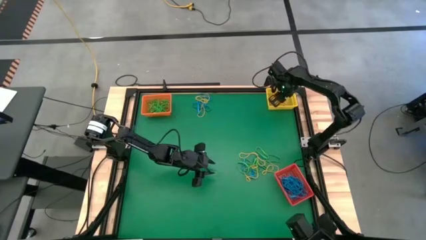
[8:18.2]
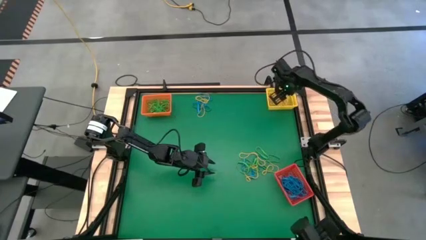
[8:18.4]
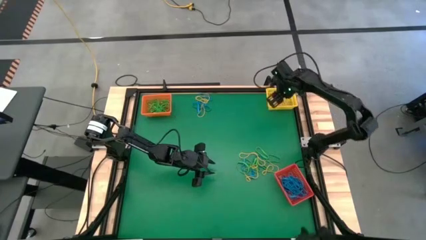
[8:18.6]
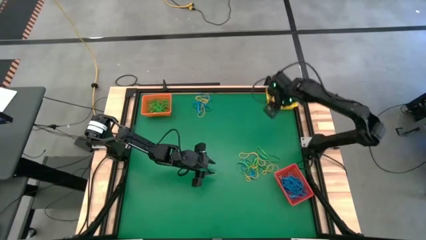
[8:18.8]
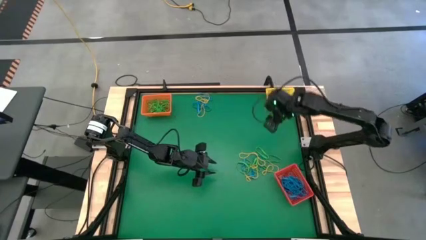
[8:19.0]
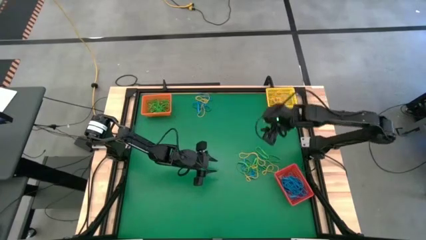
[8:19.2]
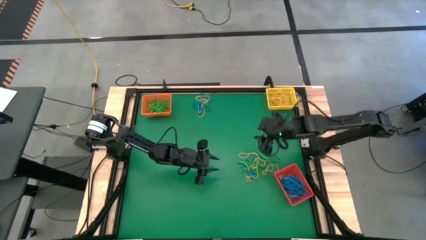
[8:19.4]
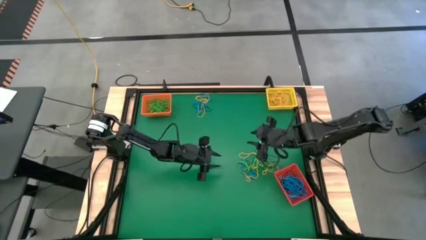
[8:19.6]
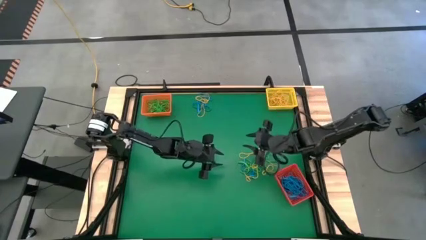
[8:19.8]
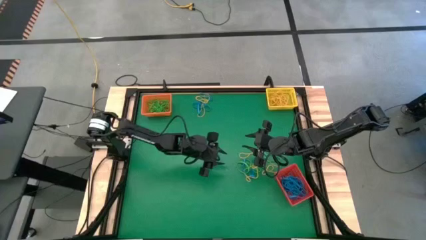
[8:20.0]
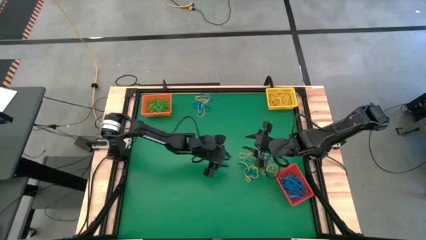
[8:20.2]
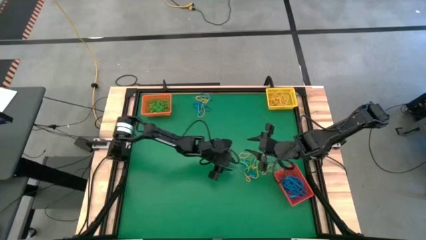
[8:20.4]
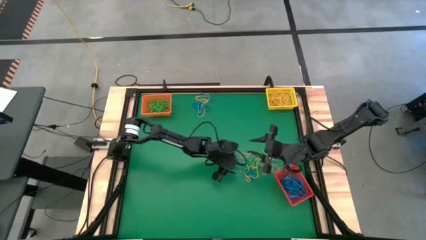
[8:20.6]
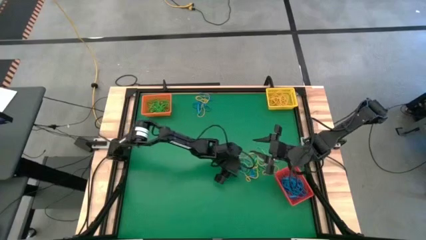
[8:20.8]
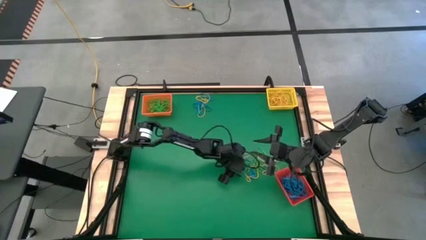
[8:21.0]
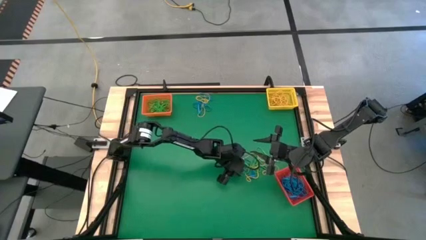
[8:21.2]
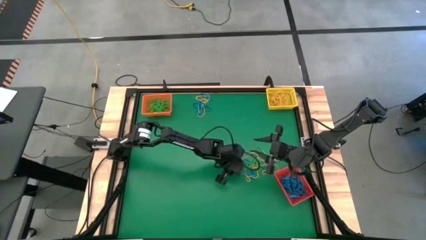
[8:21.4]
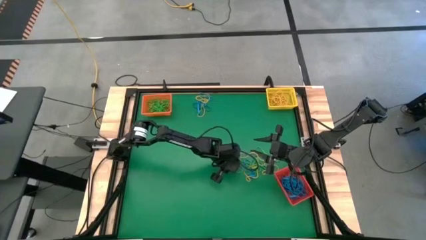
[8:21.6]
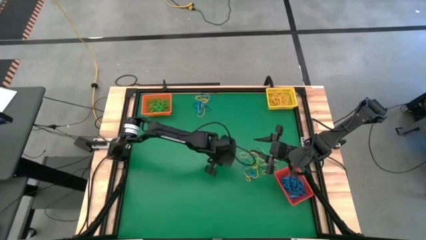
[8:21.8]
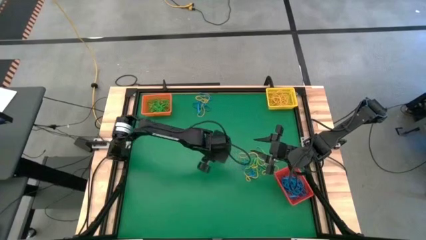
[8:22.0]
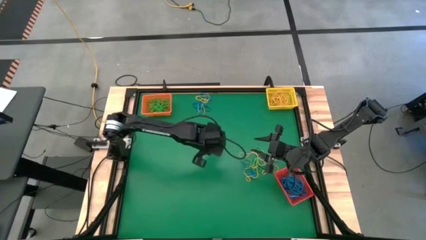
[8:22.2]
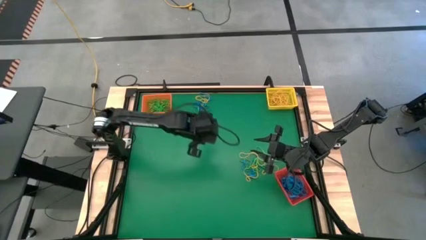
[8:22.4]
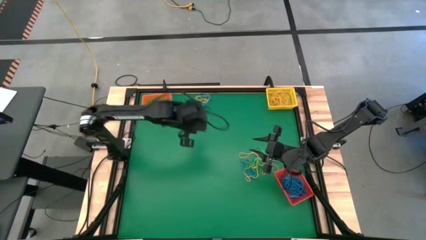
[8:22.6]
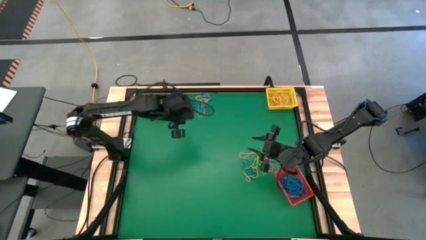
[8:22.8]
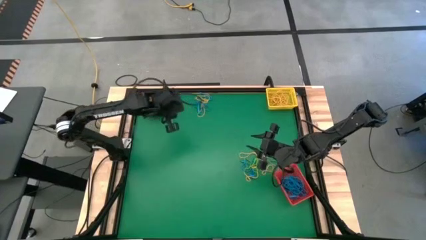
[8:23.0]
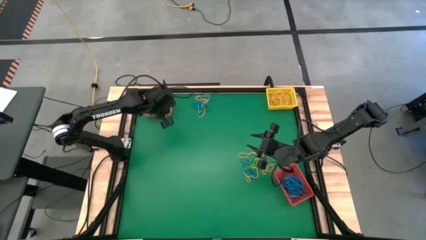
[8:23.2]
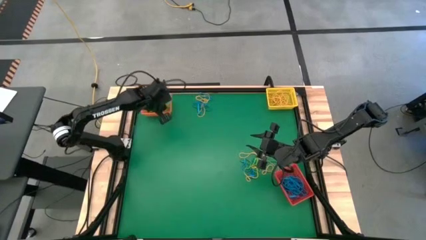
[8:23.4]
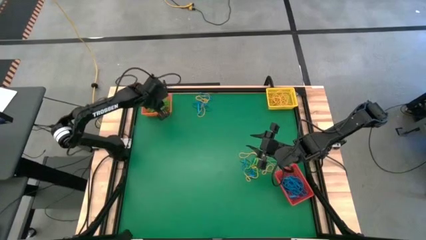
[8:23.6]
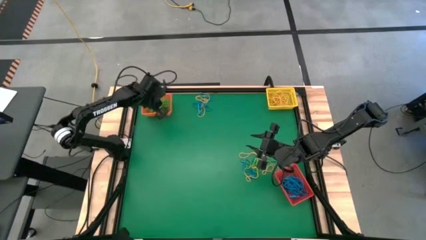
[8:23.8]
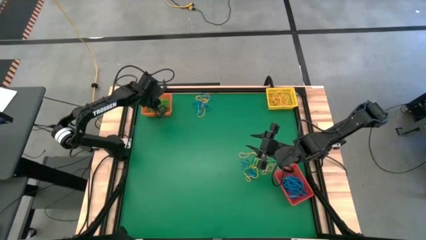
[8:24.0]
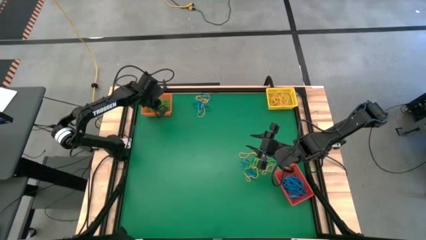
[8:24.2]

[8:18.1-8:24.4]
Task: Sort rubber bands into baskets
Put the green rubber band into the orange bin

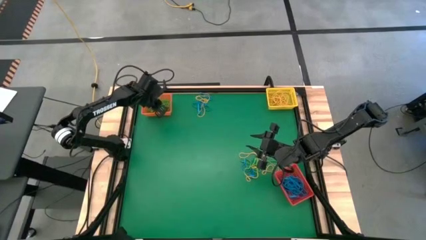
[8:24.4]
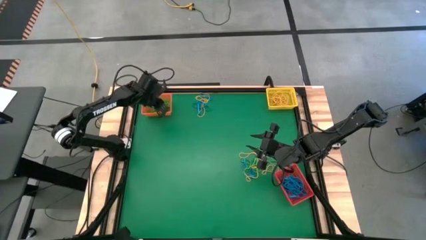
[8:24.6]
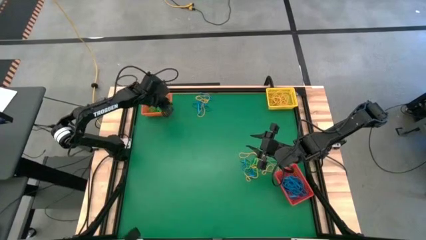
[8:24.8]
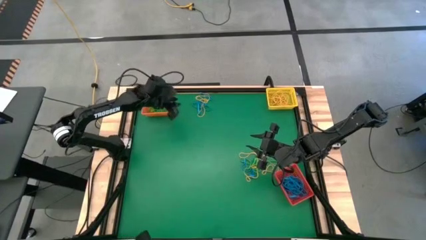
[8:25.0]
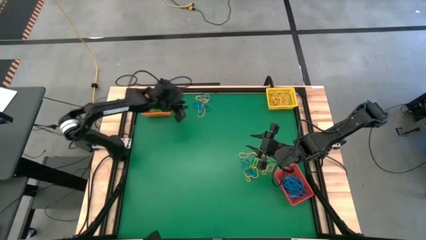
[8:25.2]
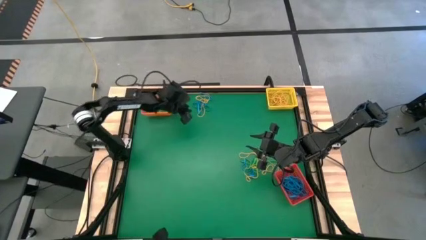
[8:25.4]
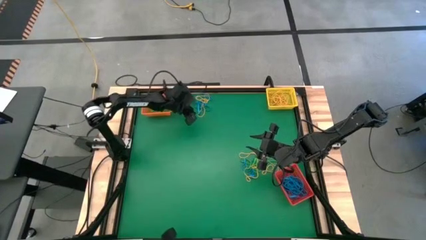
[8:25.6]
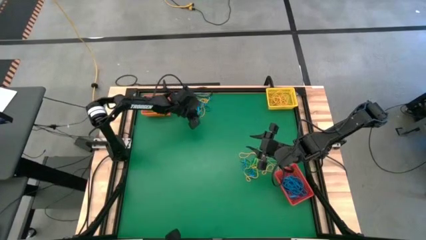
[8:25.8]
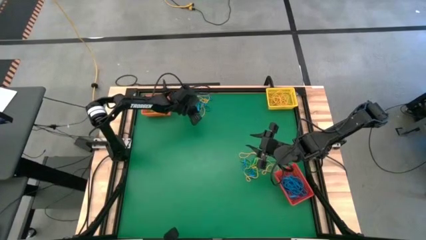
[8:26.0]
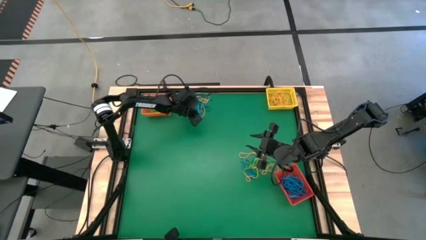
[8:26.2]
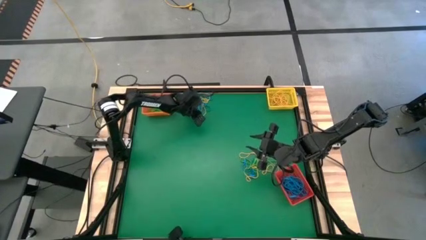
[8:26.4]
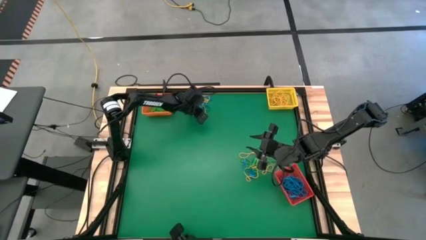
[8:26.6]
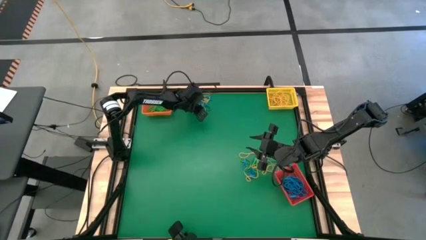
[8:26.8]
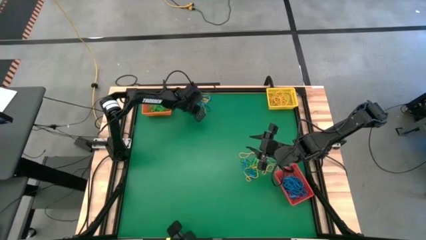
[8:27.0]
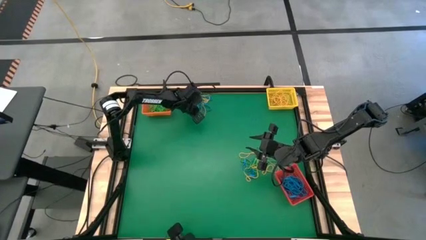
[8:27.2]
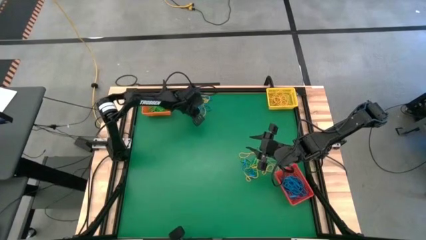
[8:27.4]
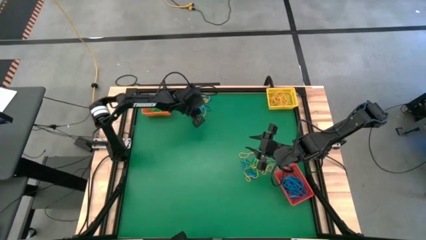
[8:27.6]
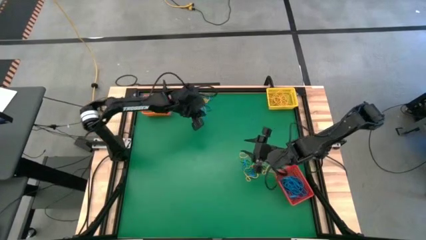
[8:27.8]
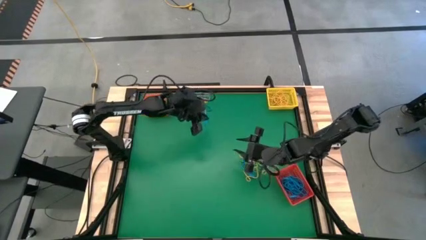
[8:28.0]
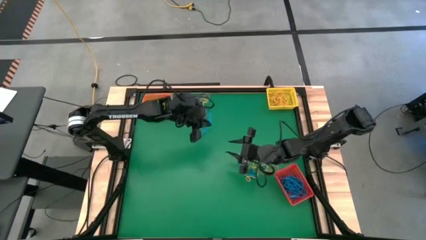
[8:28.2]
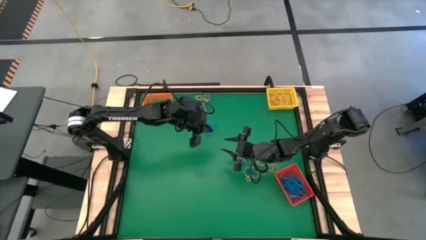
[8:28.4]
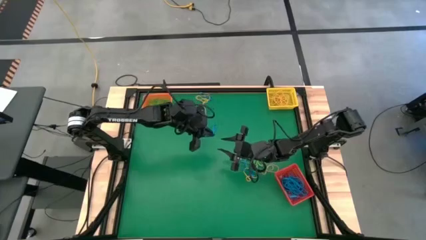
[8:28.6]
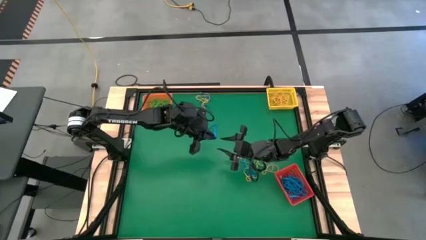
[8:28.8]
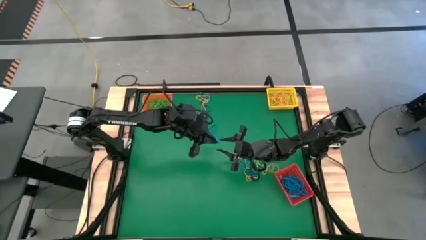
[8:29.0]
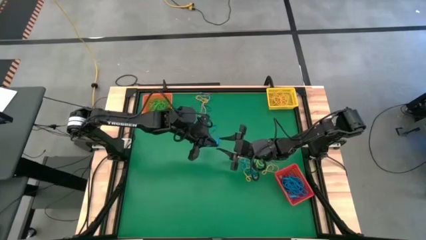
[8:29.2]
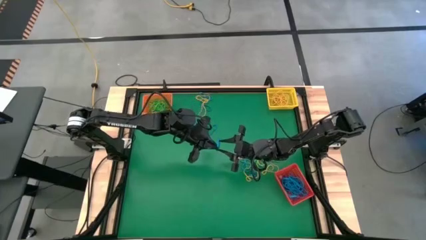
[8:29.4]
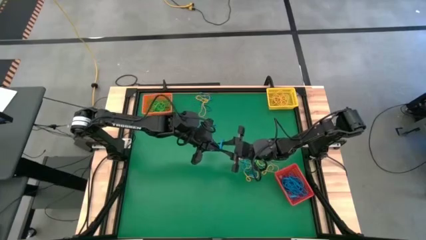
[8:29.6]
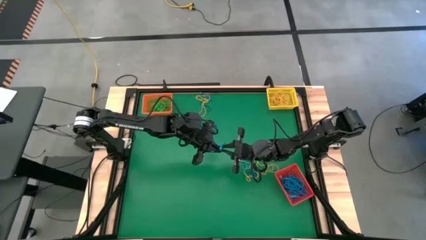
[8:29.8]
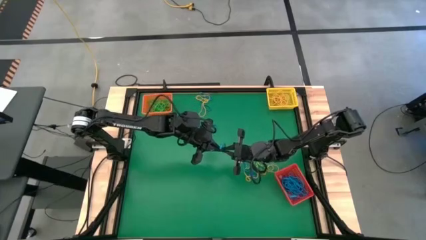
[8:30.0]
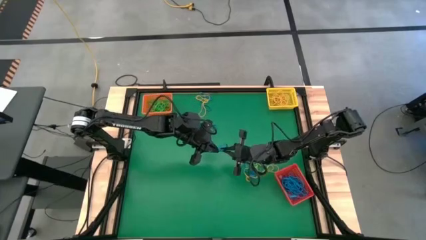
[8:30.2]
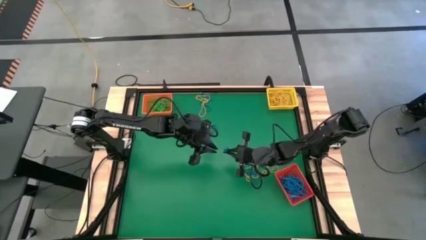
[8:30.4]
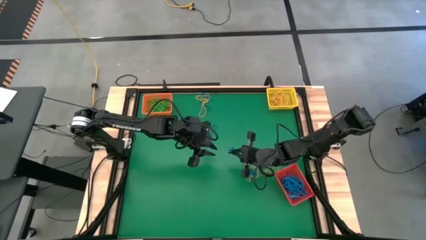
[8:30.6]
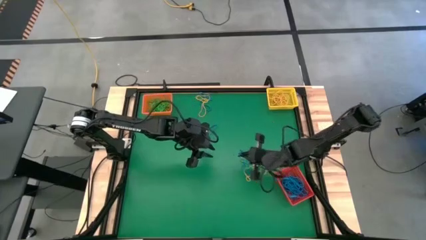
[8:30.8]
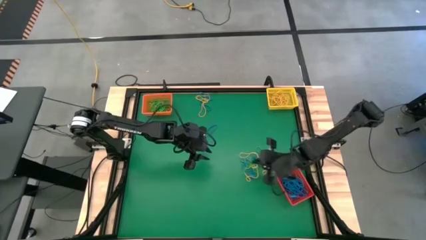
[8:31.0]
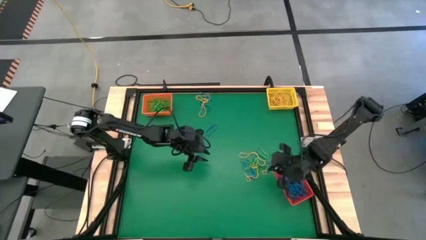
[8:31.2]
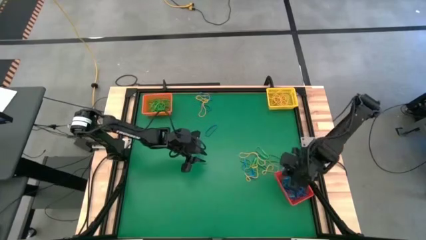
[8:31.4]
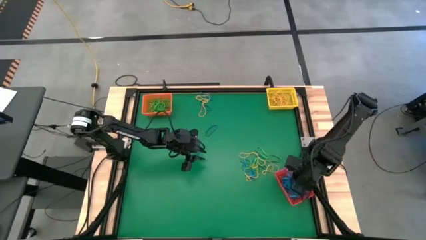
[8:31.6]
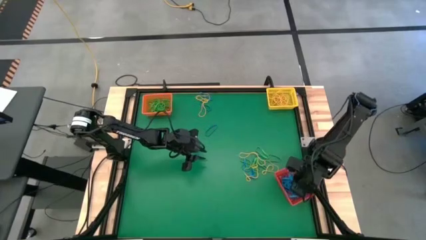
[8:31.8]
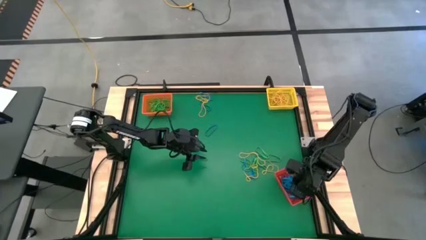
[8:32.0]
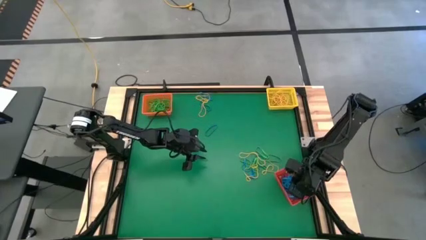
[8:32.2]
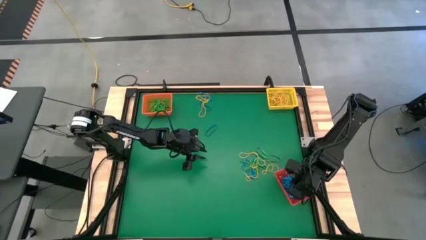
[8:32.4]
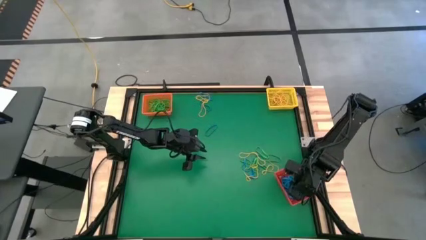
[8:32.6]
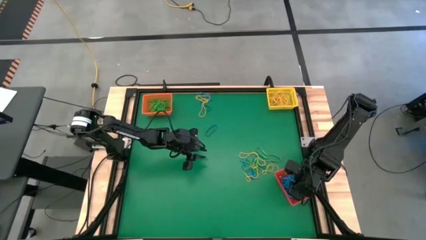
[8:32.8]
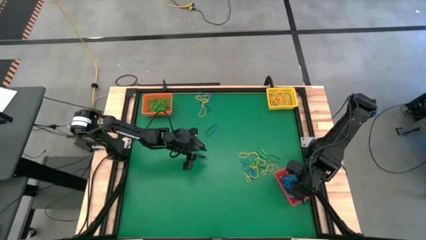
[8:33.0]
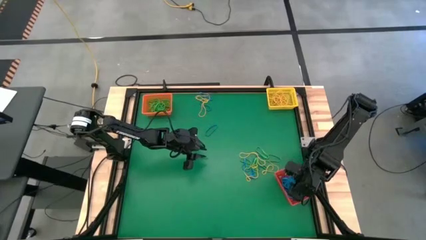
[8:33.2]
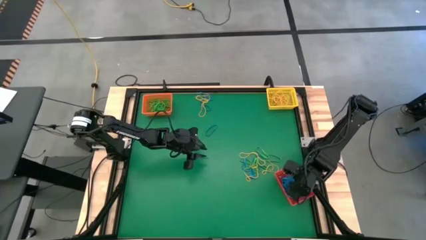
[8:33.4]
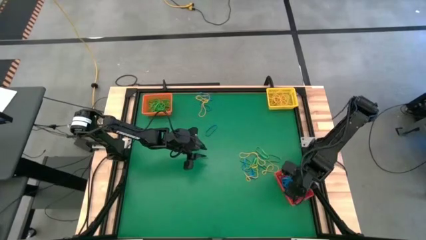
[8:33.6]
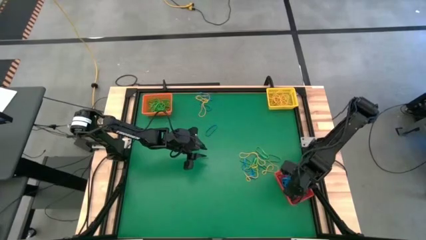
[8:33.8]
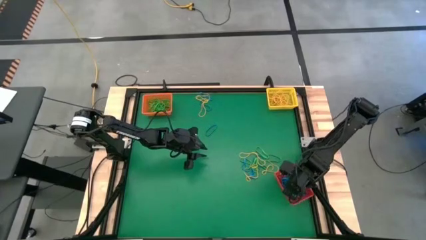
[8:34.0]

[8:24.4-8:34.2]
Put the blue rubber band into the red bin

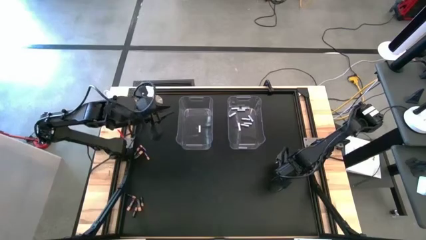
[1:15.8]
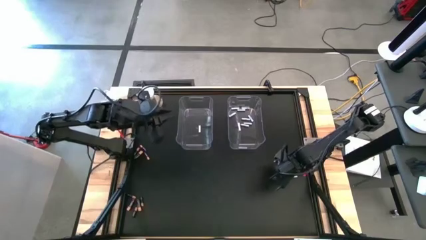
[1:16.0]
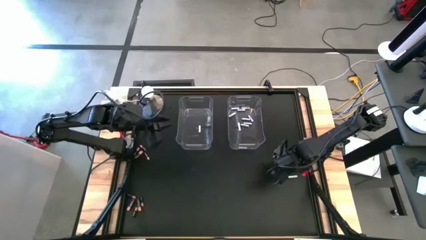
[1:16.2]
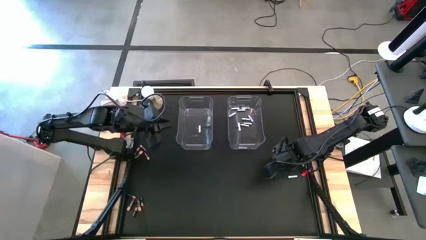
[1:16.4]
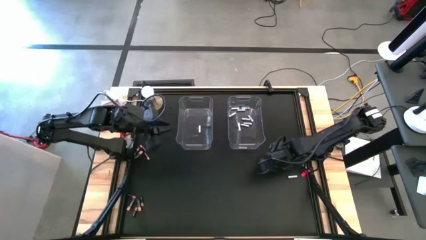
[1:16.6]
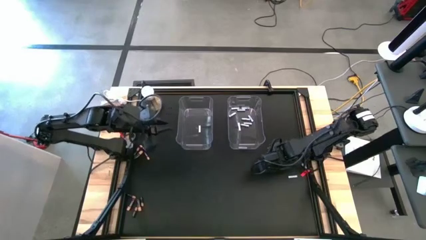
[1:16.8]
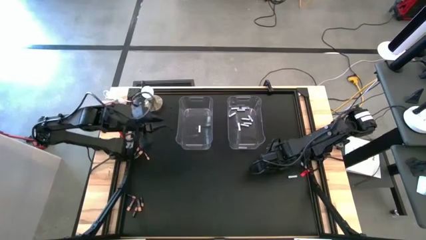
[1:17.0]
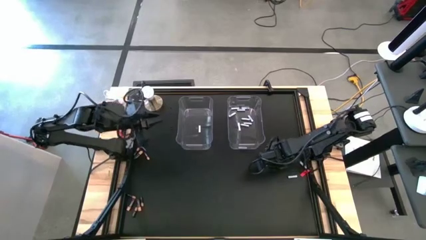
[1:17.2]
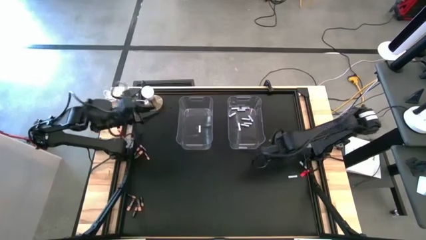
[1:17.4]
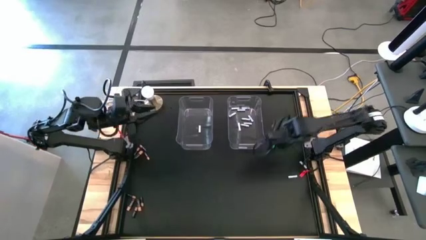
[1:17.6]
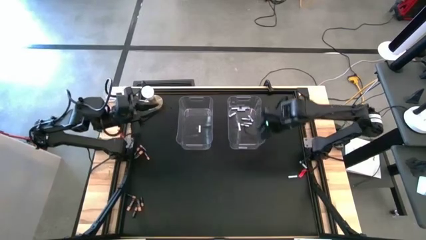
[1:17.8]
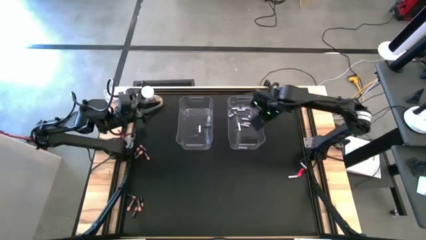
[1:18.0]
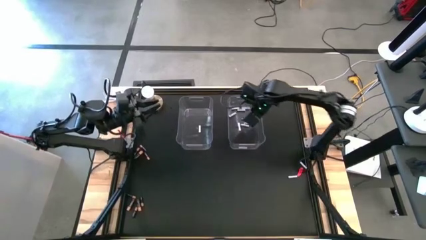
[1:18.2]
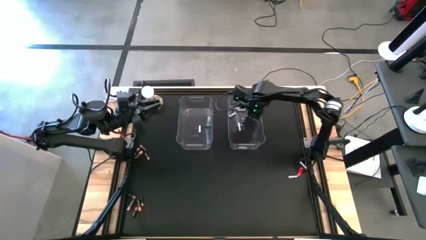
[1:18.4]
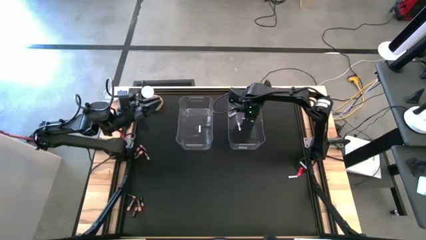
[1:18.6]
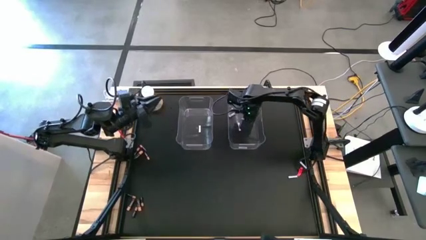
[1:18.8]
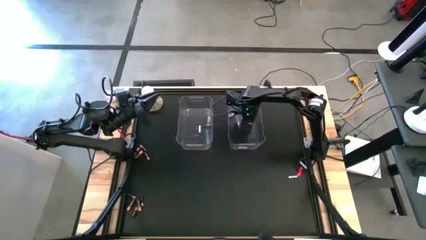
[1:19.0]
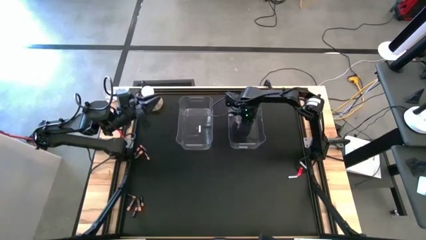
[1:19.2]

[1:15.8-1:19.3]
Task: Sort batteries
Put the white battery into the right transparent bin
